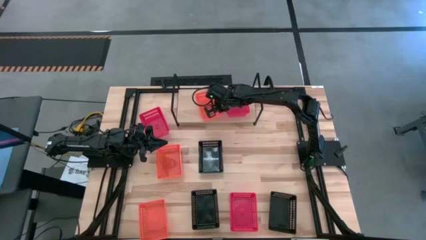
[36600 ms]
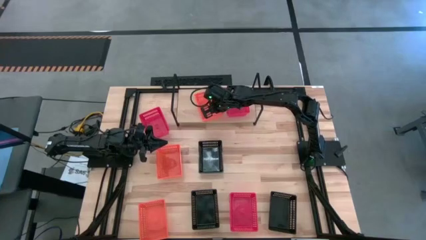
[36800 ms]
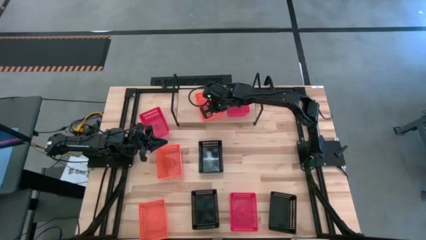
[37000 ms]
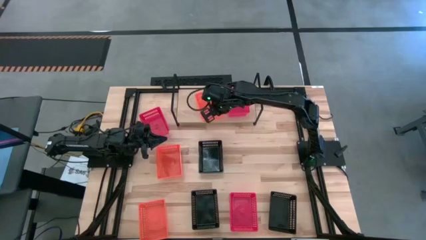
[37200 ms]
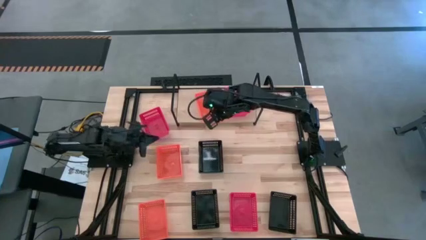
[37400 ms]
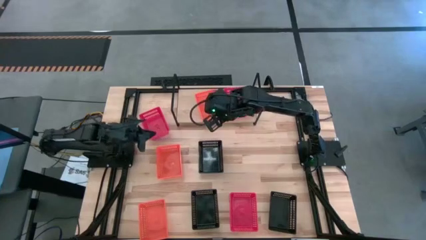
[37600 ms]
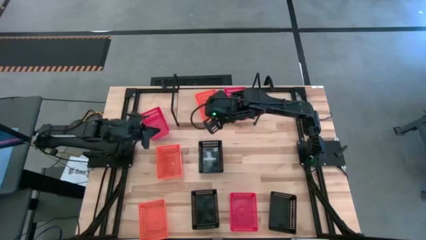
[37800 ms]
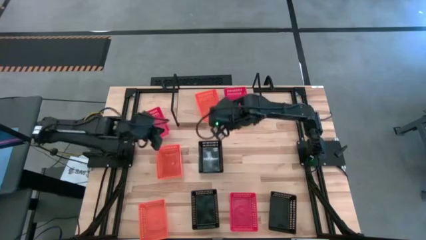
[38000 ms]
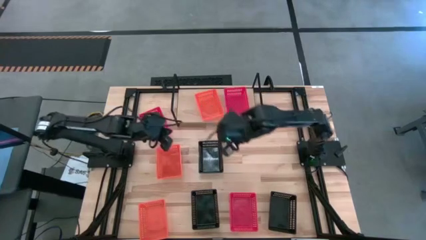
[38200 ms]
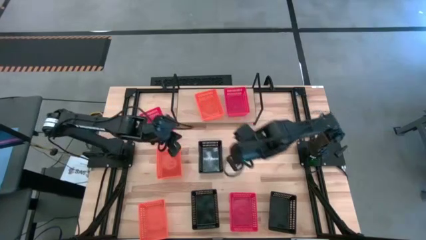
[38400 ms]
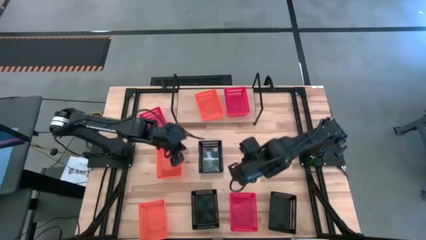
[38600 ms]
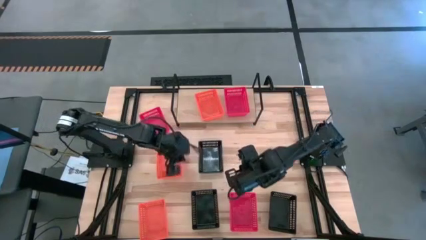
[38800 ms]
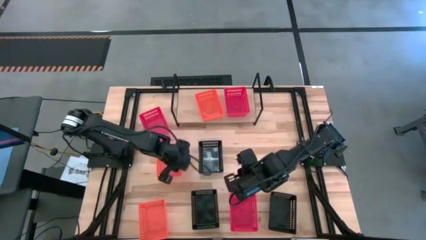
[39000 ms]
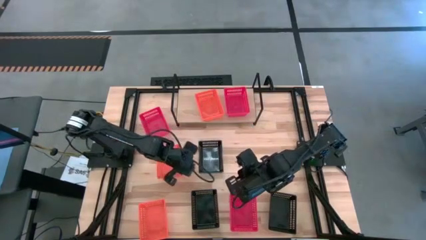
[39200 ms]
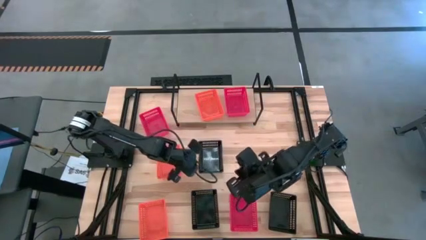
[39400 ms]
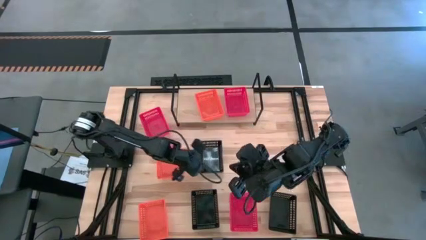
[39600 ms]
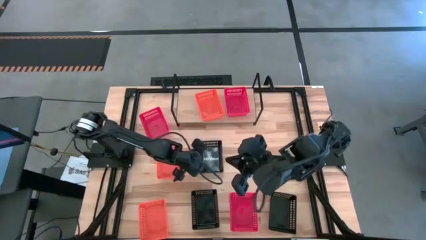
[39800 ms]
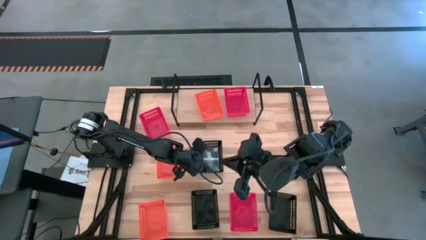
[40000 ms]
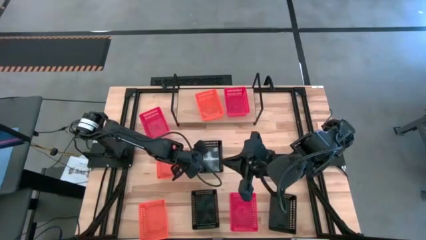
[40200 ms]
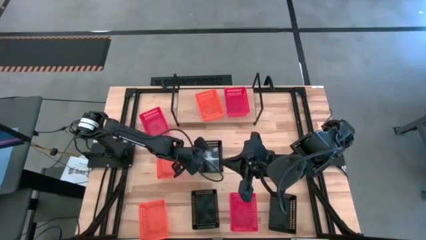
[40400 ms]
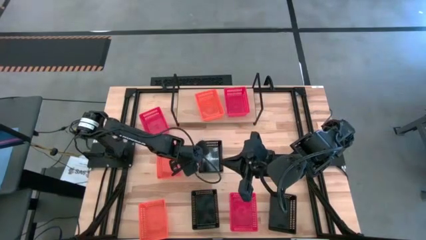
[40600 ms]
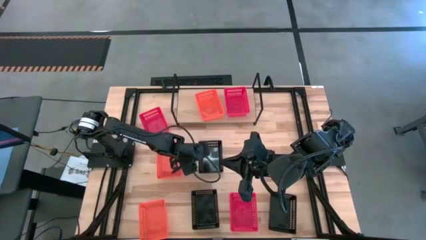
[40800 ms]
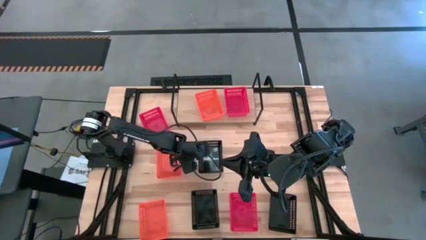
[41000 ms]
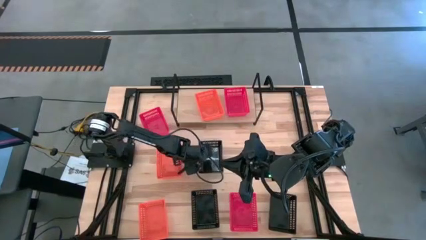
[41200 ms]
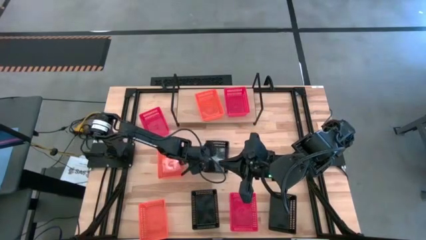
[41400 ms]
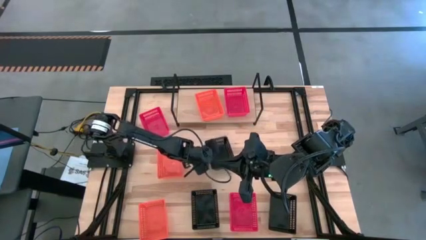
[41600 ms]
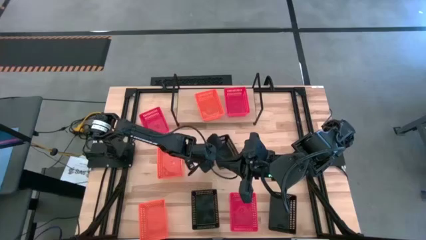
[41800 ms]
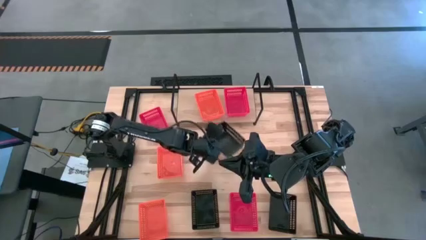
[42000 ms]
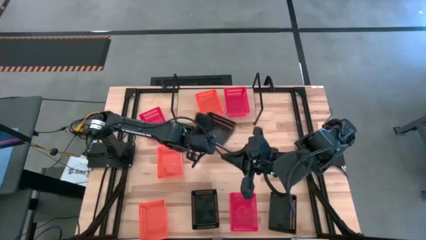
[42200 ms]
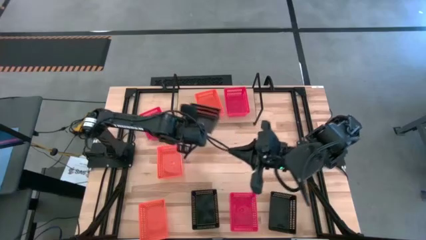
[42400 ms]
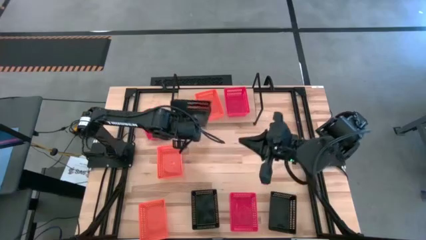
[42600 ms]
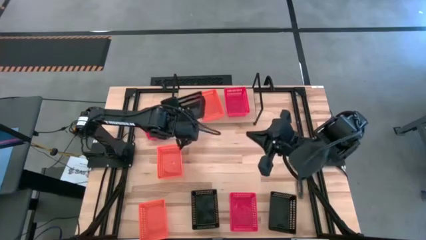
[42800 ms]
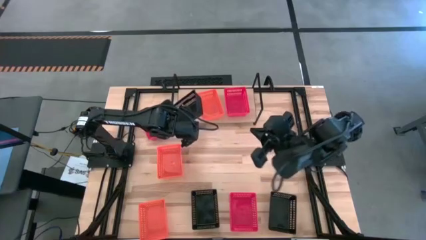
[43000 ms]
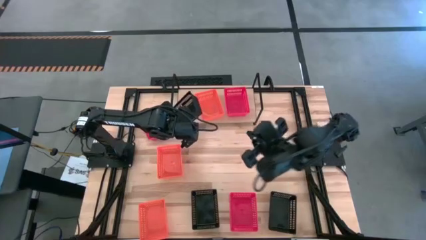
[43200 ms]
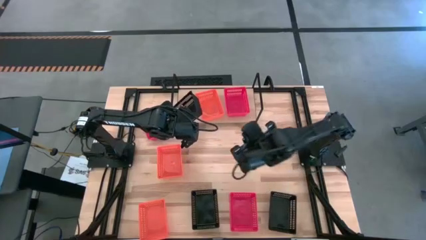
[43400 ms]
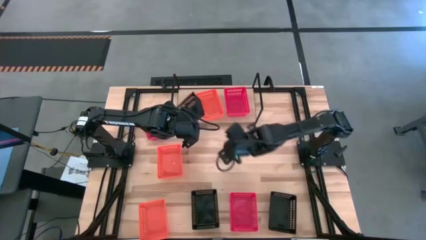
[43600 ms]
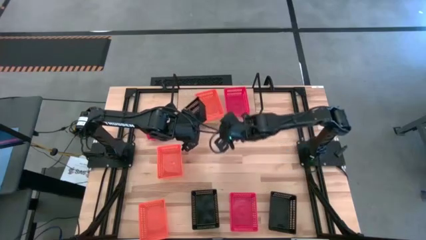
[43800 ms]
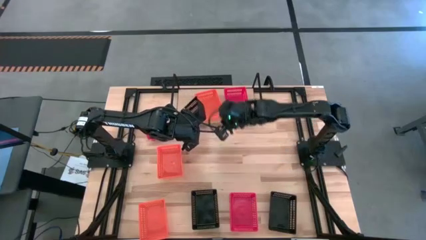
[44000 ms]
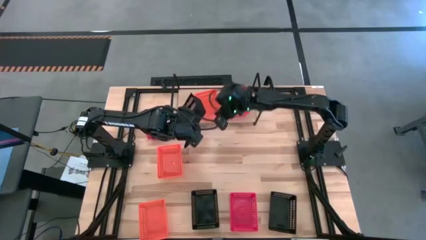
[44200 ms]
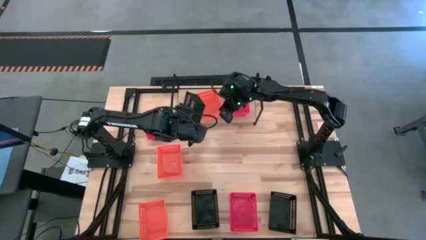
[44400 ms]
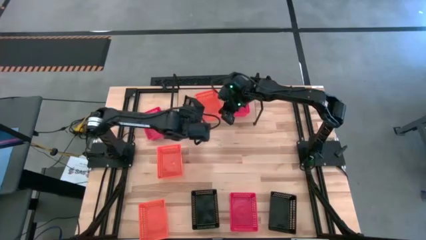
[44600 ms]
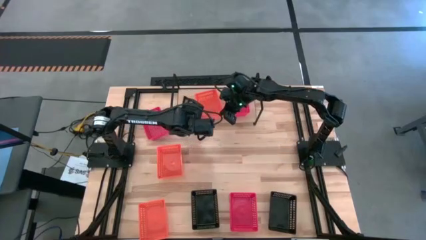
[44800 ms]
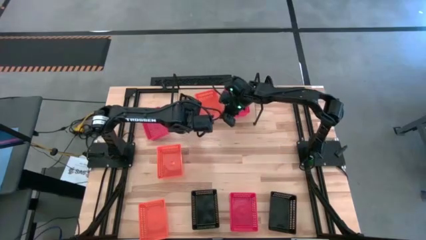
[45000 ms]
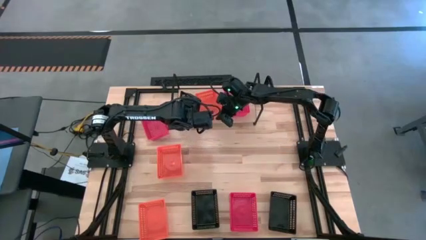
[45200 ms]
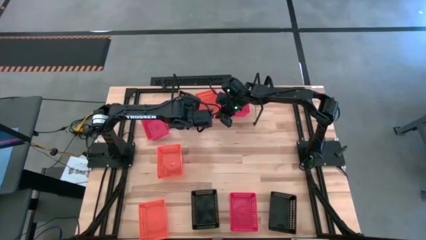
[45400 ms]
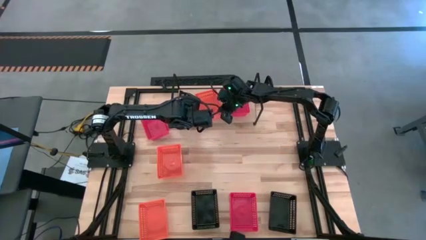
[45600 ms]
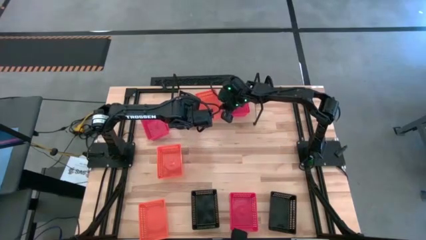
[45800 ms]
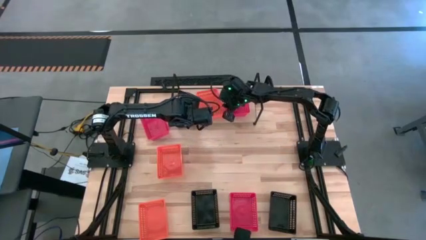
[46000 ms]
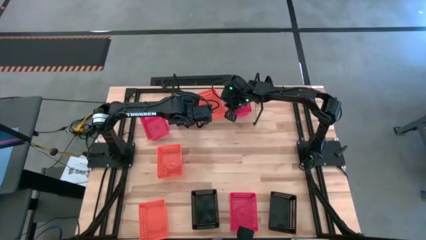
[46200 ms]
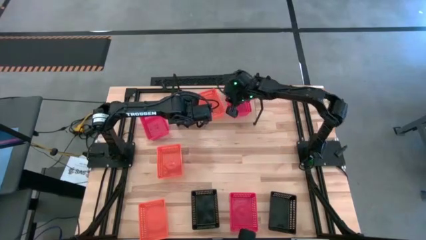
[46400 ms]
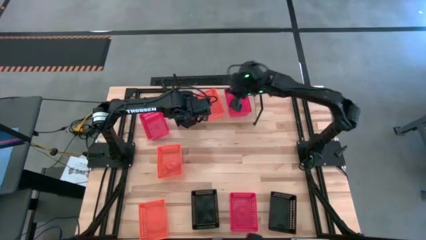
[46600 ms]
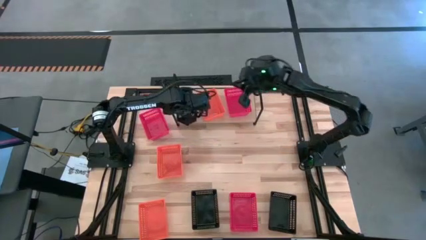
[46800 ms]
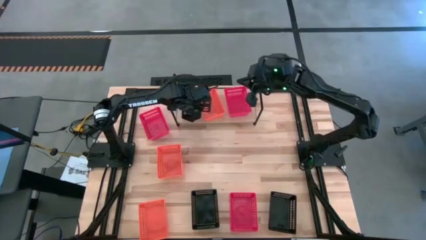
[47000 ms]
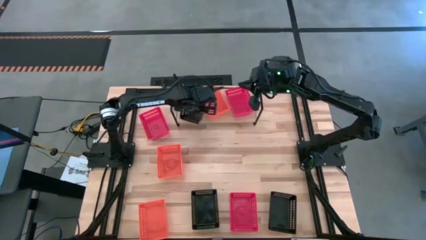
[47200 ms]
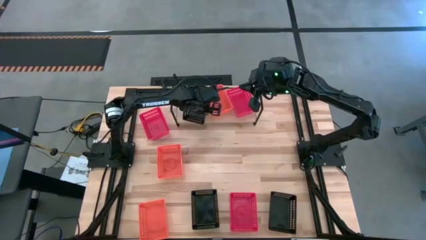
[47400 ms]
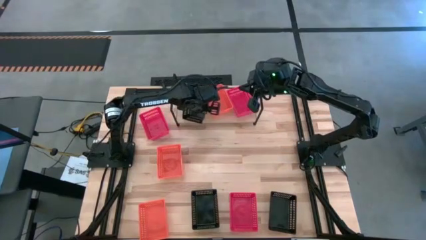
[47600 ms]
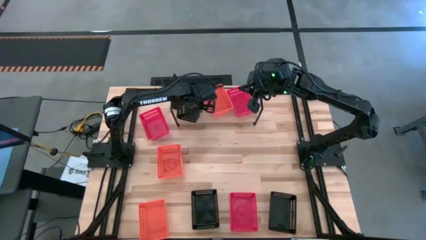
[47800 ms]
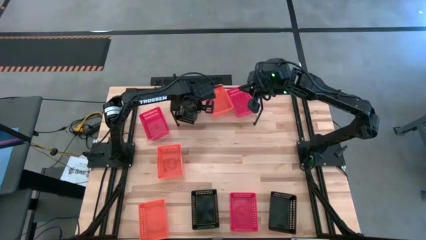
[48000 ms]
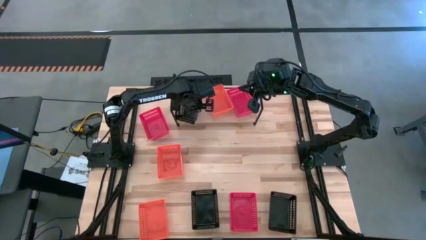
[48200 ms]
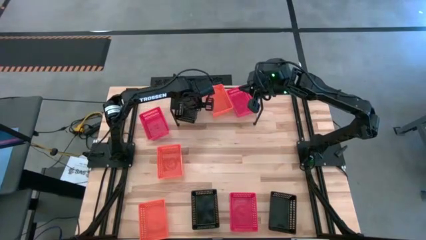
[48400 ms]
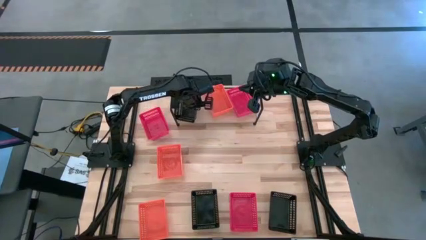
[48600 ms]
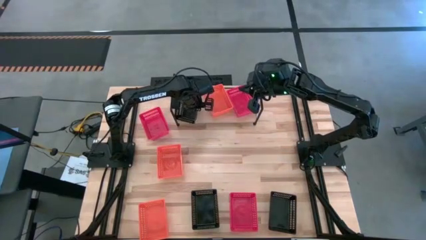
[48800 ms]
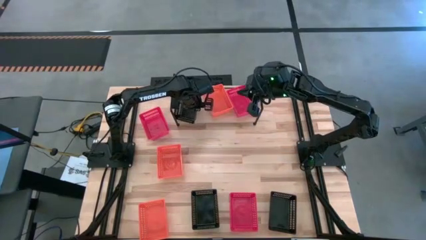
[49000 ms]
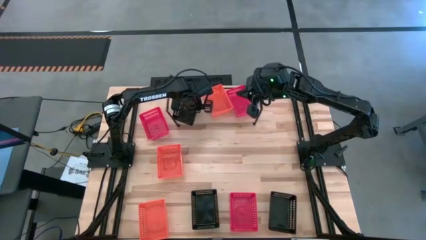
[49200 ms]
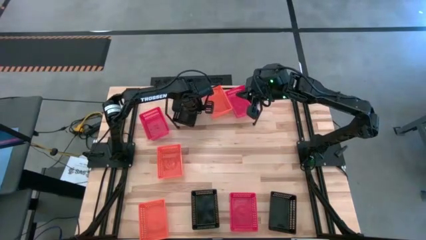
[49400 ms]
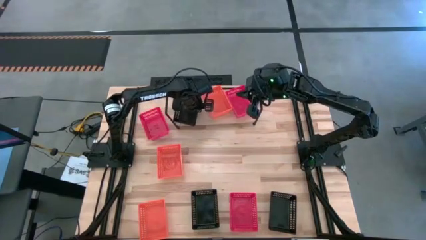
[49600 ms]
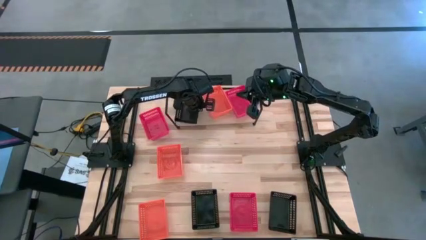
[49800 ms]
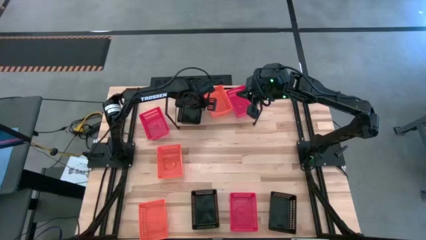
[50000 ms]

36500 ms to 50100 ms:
Task: Stack baskets on shelf by color
Put the center black basket on the shelf
